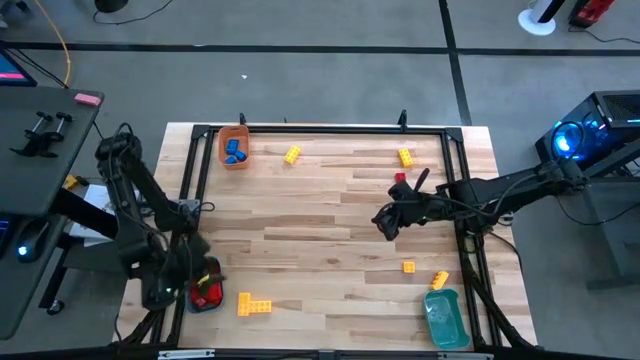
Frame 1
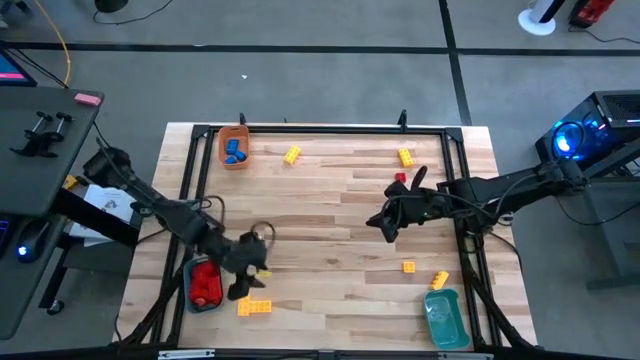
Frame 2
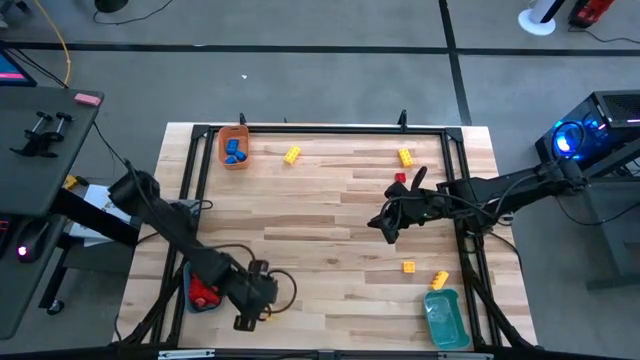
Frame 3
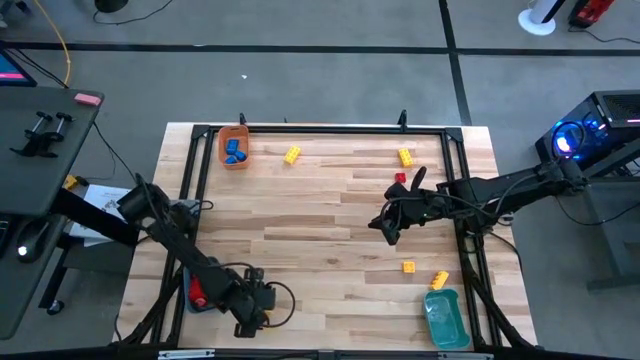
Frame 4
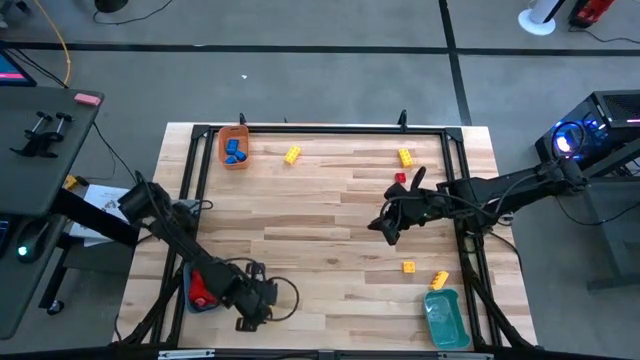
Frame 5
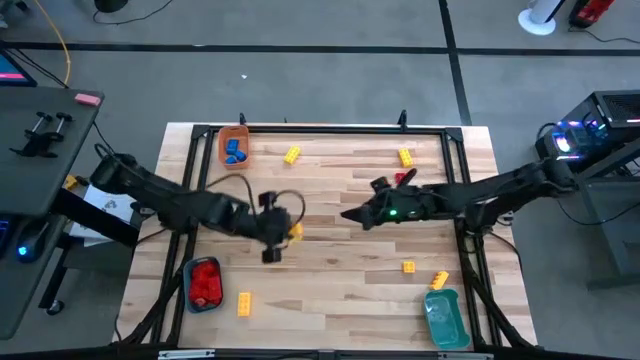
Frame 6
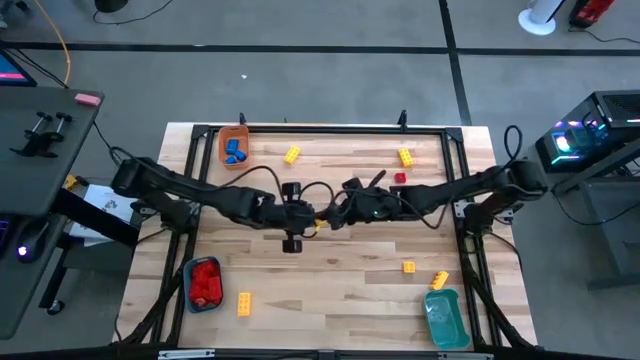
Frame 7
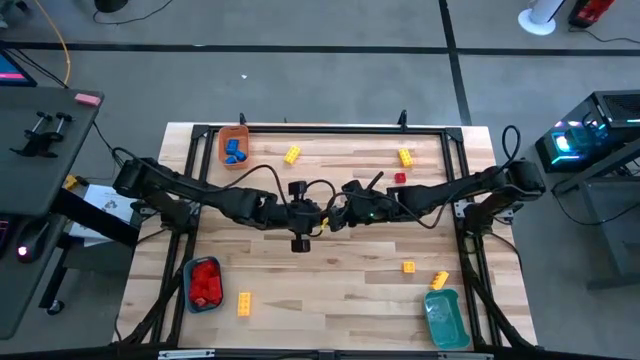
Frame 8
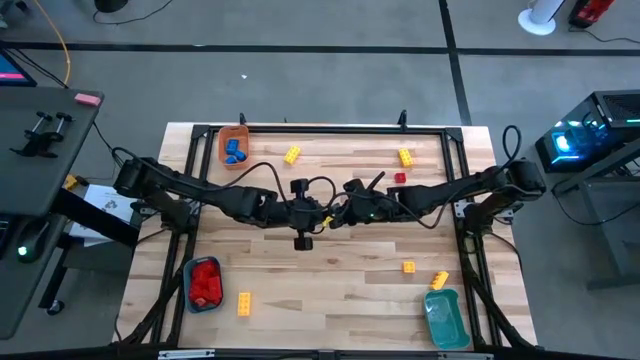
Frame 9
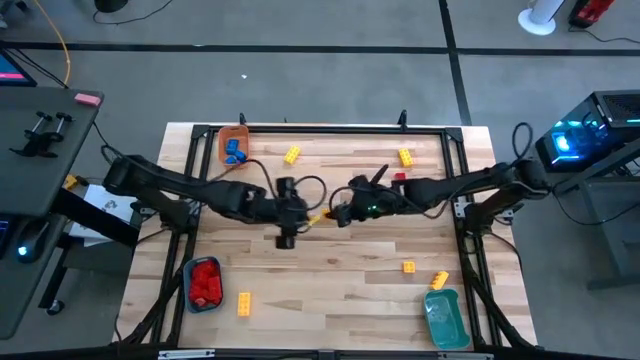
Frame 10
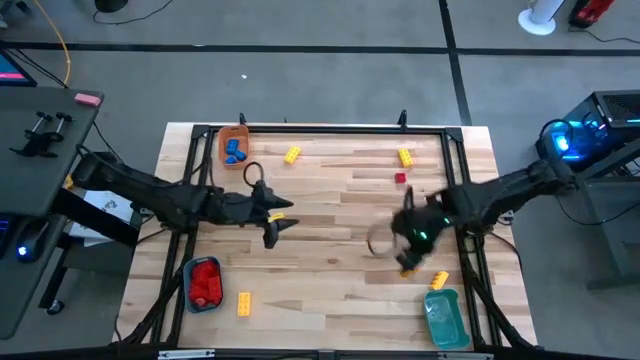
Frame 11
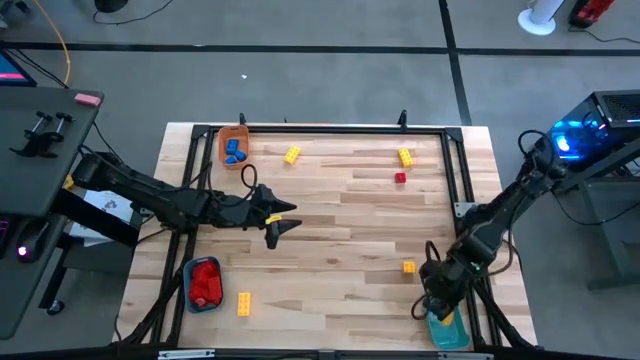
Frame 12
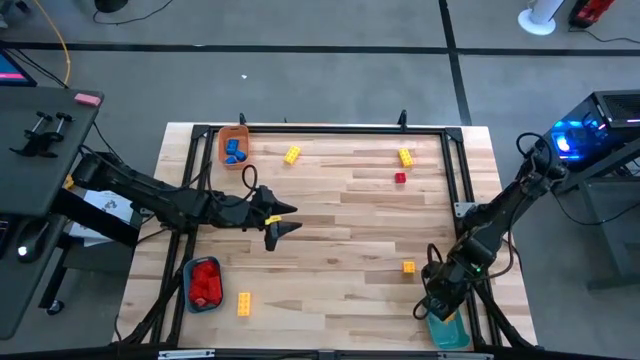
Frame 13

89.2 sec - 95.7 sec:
Task: Sort blocks
Put the yellow game piece into the right blue bin

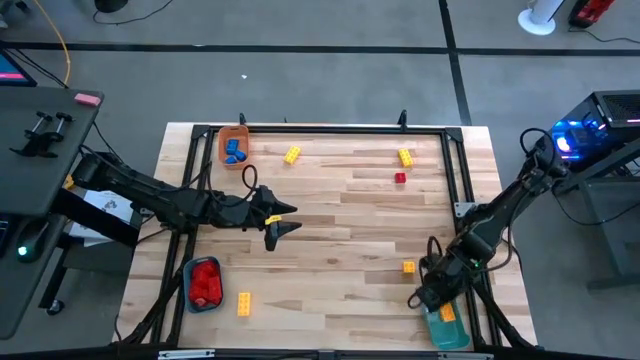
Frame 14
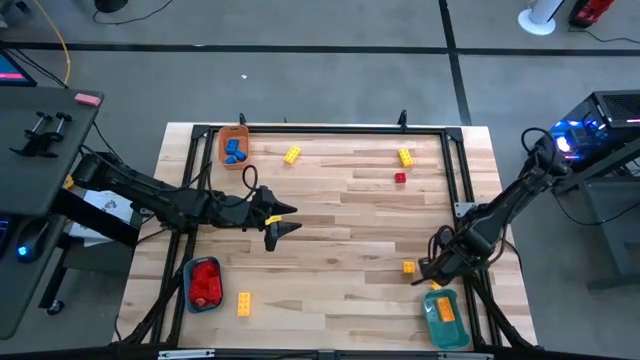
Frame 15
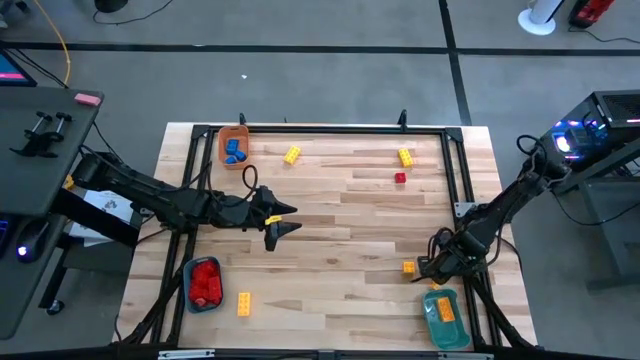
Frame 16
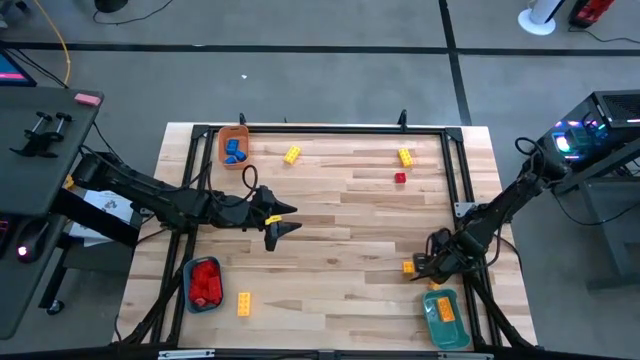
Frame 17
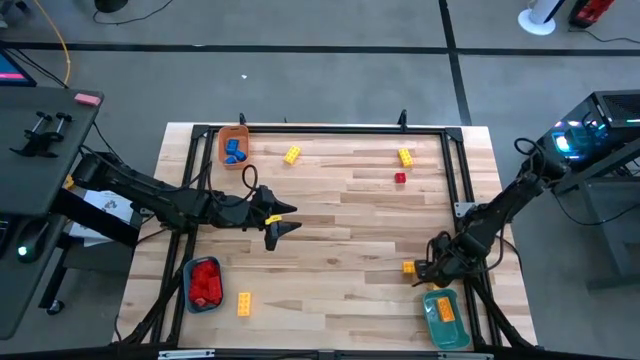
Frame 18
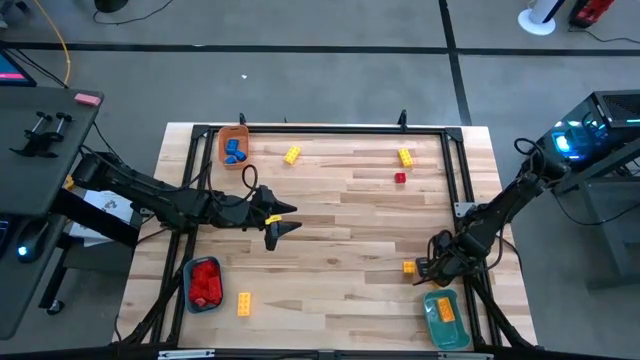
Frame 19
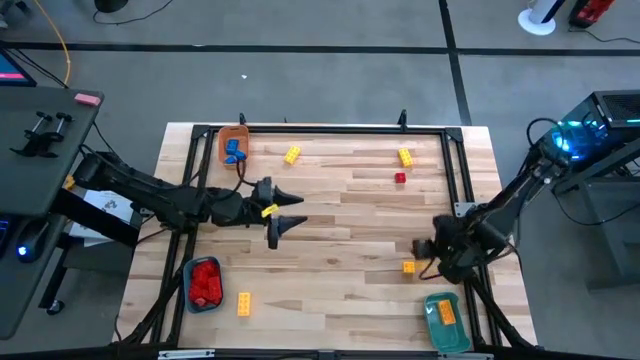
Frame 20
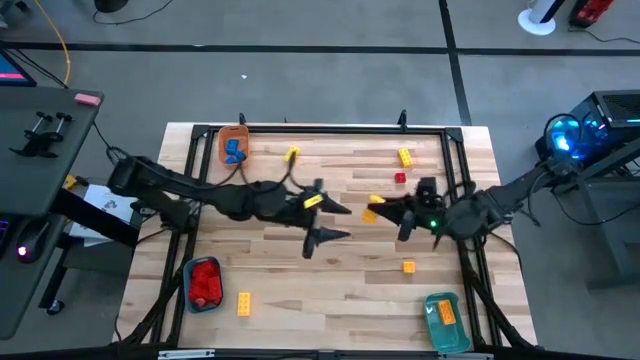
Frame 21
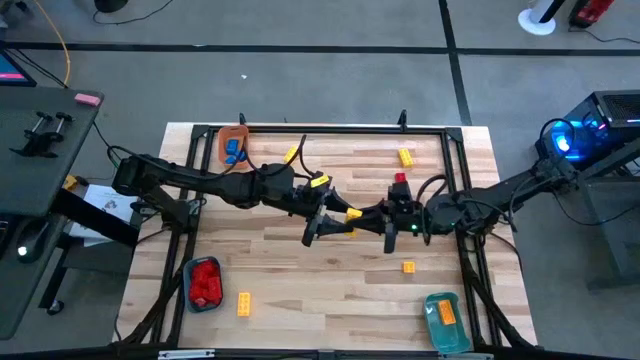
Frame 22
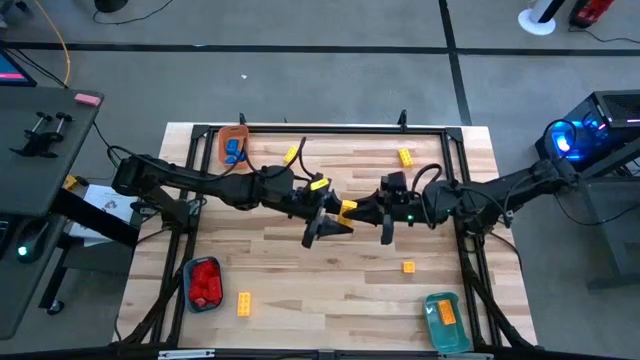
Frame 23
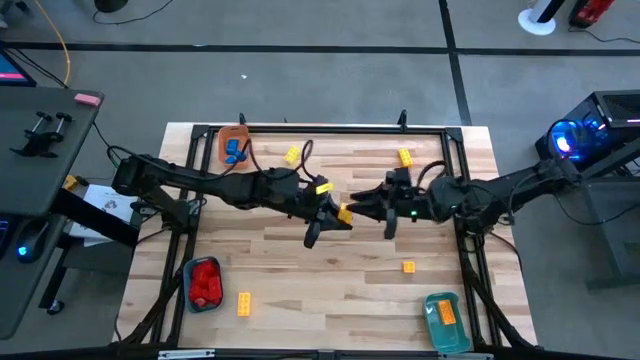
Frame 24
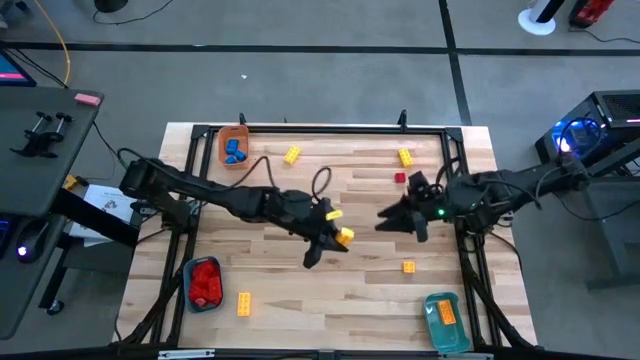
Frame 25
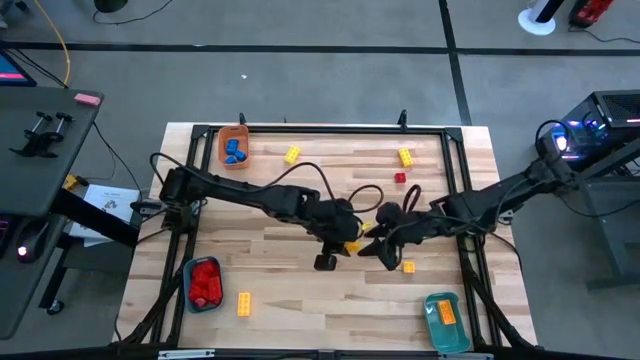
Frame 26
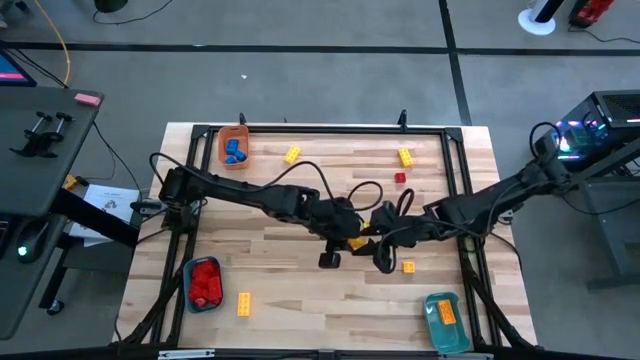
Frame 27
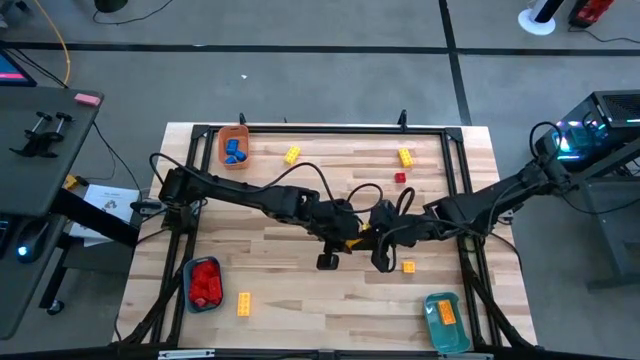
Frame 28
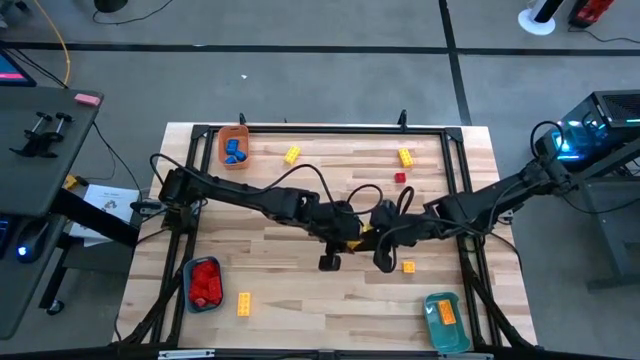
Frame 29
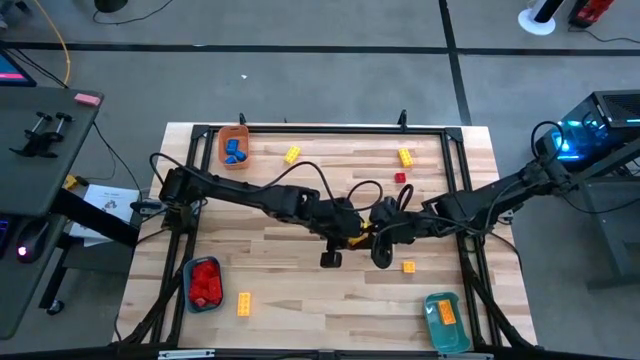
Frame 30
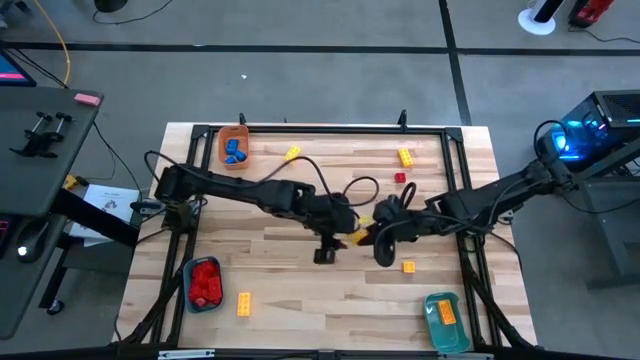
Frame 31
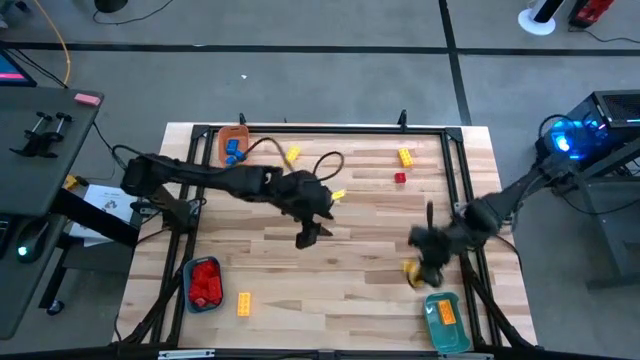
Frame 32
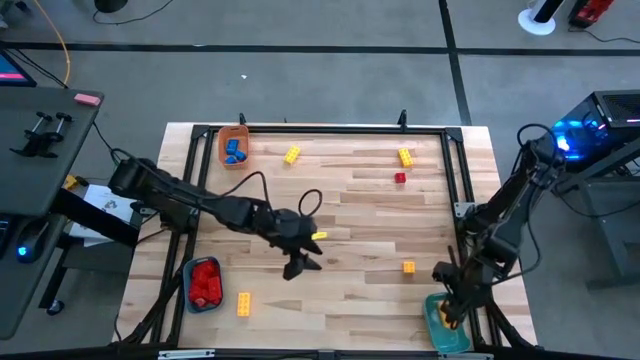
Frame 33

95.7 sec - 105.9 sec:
Put the yellow game piece into the right blue bin

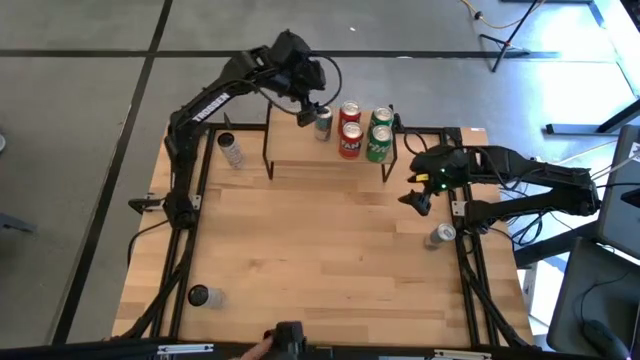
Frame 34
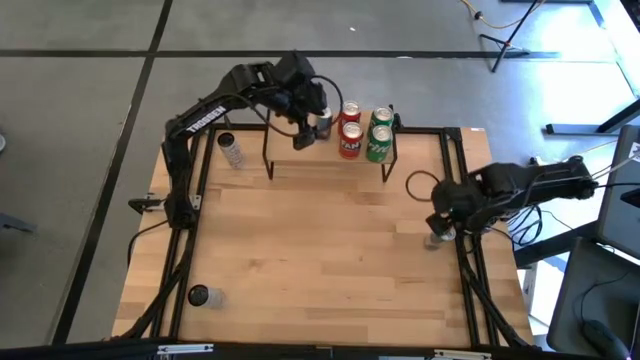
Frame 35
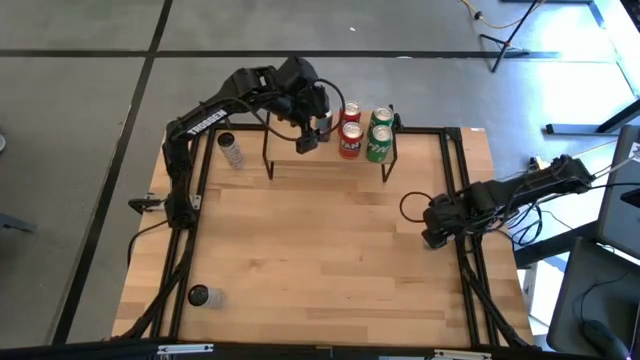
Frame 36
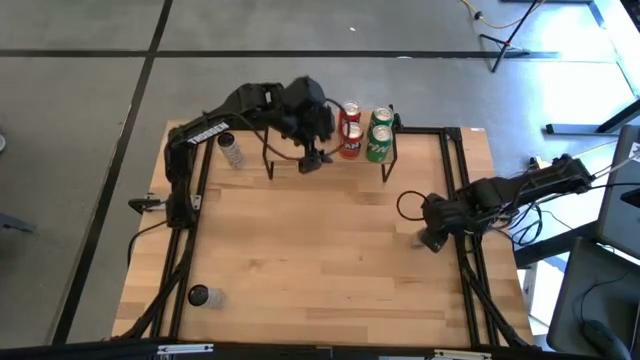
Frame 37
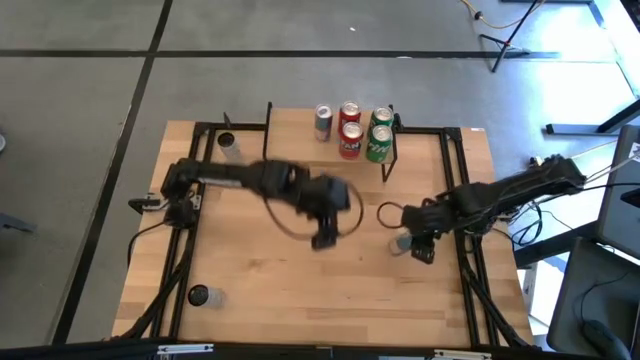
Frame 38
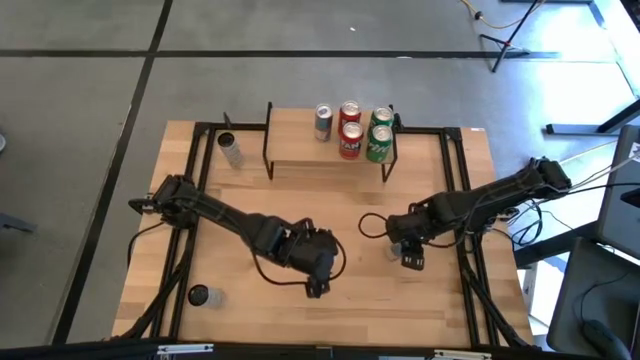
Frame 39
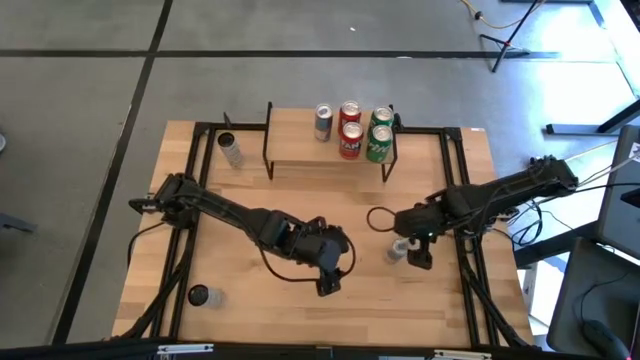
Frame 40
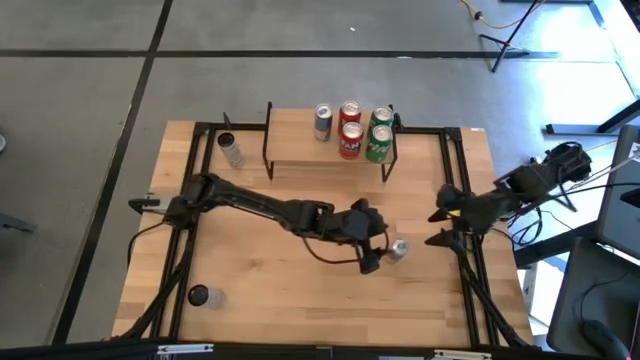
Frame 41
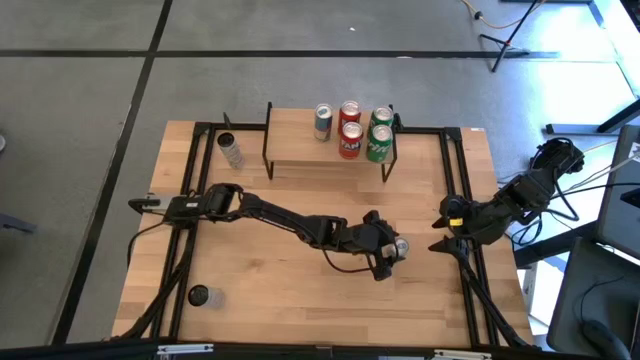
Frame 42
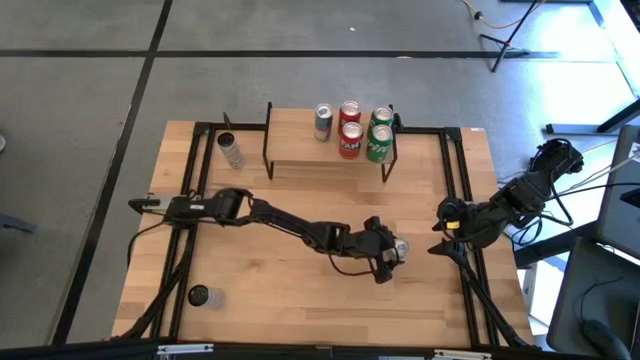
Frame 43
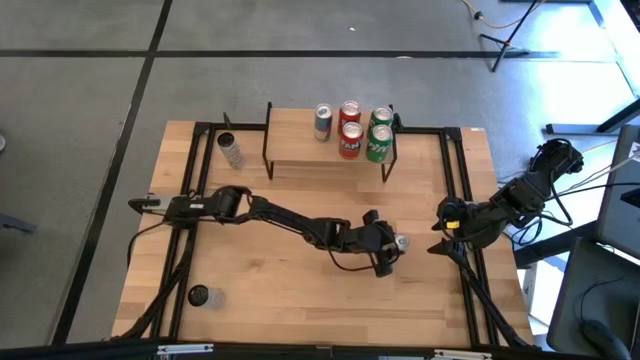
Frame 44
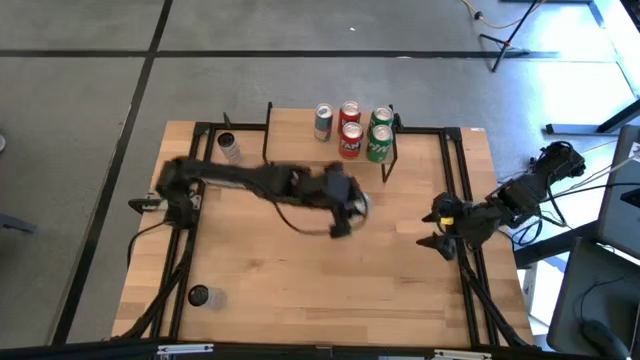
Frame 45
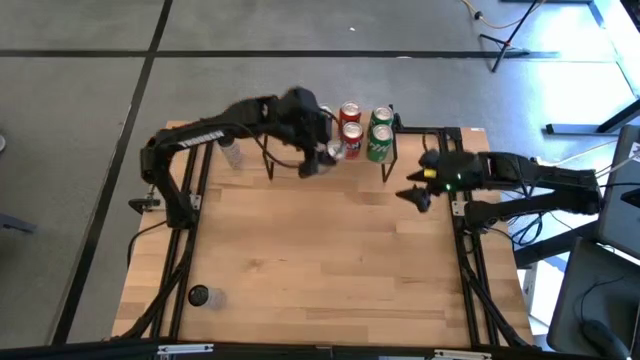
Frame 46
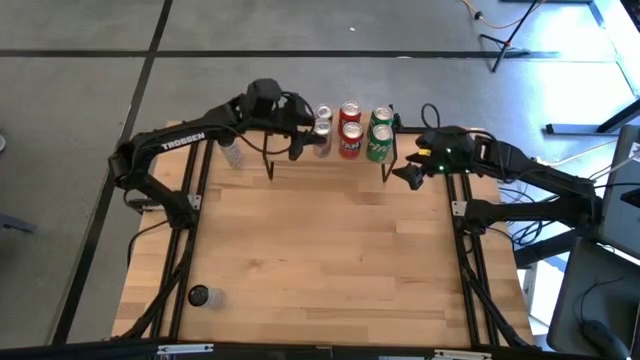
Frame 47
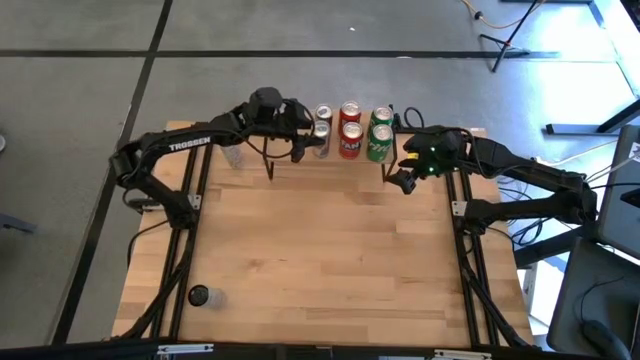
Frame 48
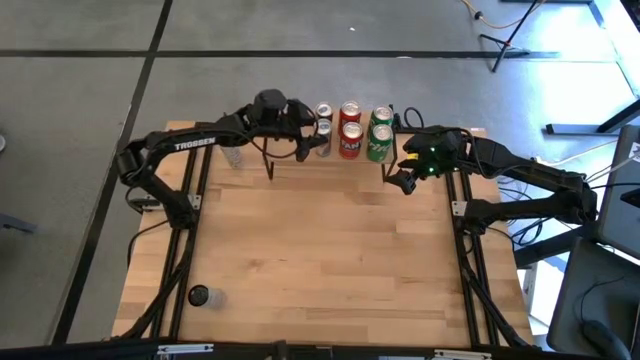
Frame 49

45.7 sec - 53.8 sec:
Task: Place canned beverage on shelf
Put the blue soda can on the shelf aligned with the other blue soda can
